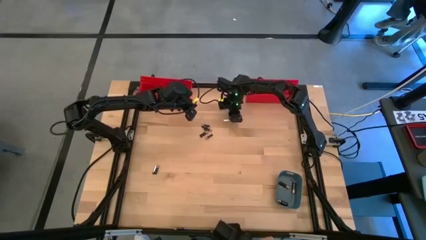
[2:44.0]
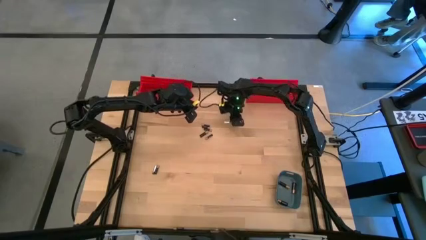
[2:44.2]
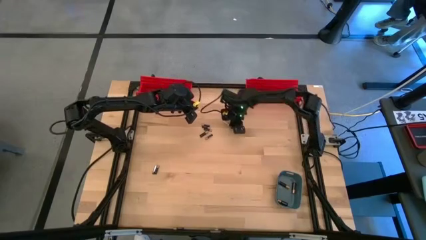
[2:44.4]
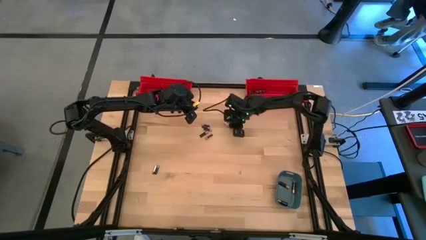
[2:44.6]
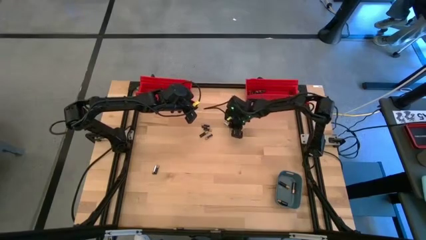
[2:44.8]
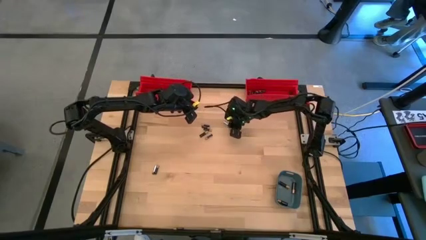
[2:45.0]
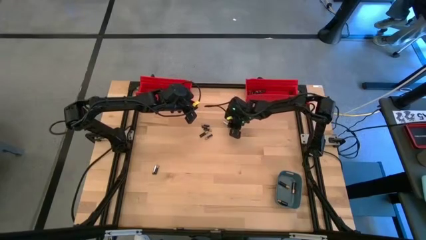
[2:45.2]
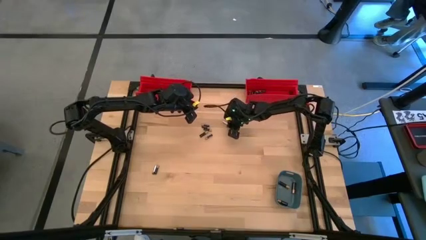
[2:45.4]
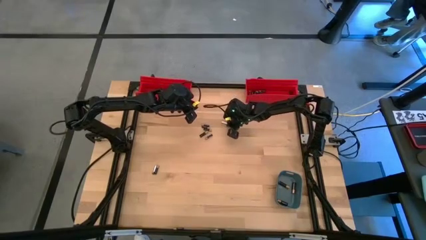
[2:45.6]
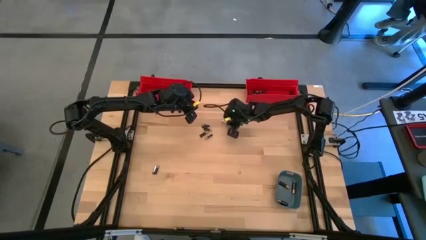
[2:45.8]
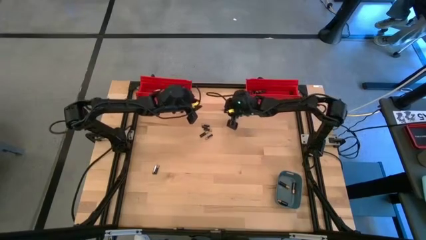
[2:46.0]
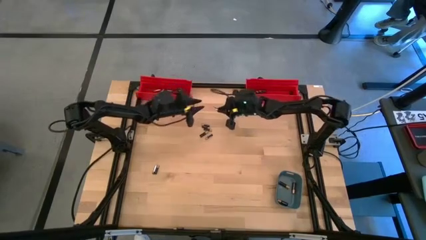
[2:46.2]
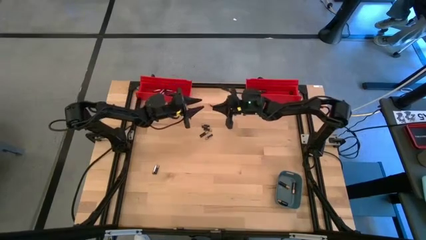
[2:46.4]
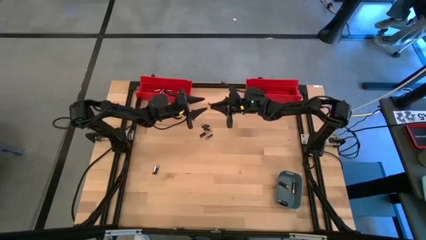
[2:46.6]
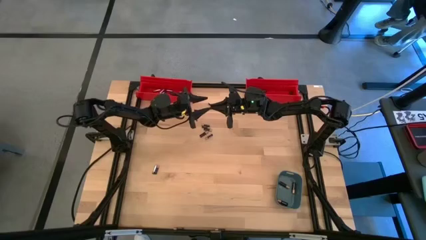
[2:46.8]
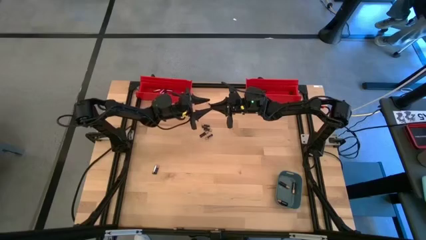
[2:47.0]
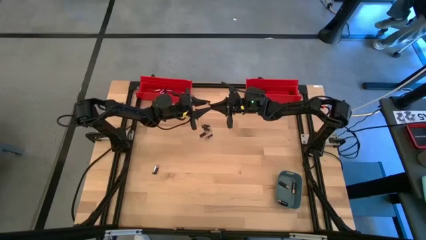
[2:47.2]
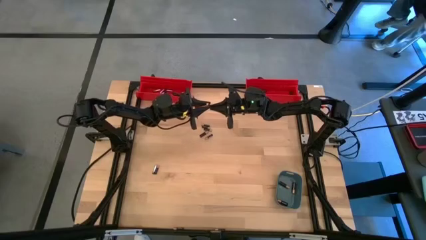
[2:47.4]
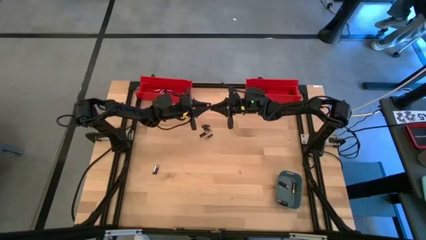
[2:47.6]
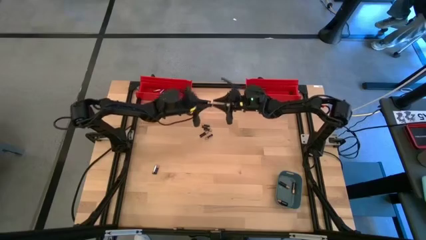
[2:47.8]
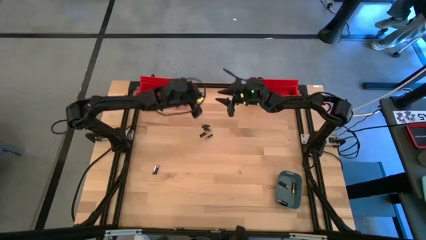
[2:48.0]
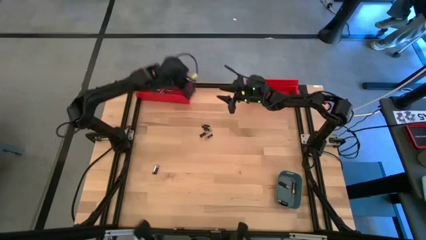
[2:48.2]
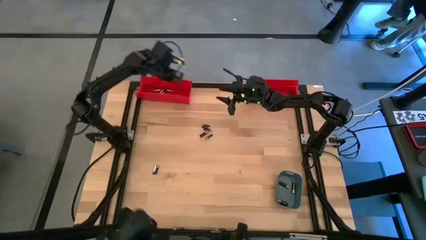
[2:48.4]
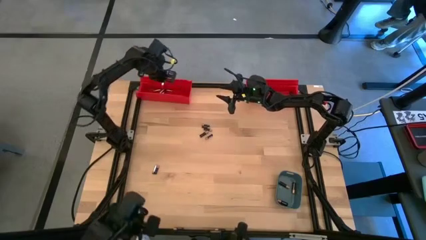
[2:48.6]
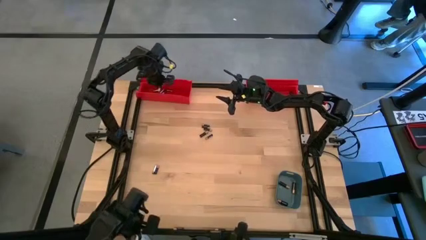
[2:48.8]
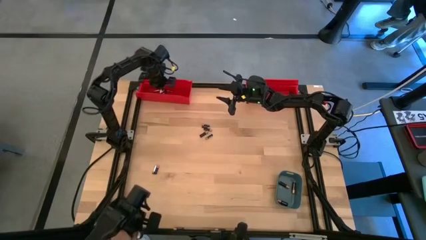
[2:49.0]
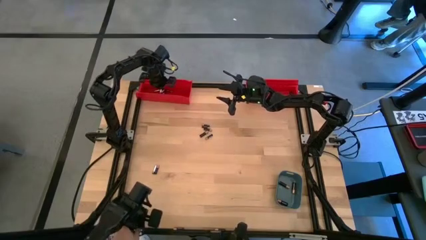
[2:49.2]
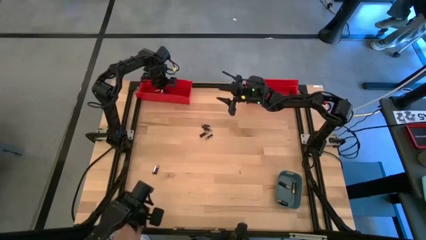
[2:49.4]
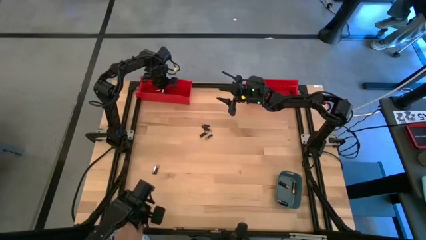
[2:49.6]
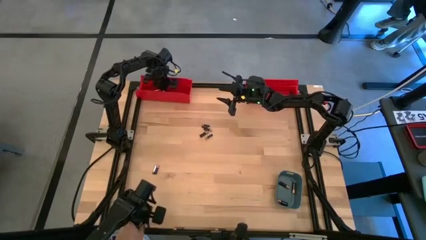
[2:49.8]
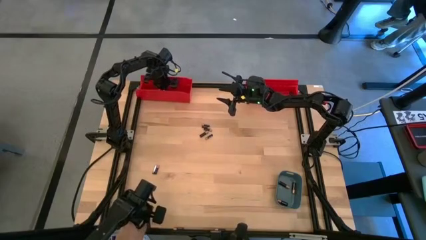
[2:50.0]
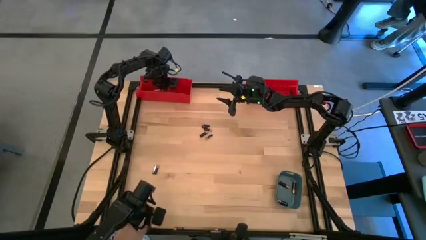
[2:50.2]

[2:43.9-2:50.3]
Task: Sort batteries
Put the small silver battery into the left red bin

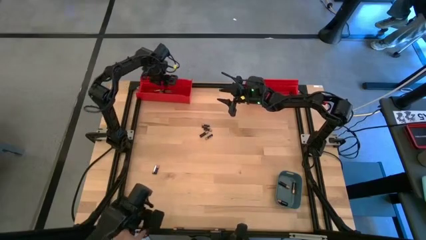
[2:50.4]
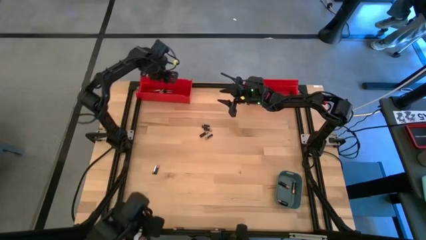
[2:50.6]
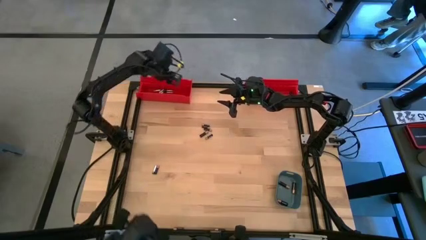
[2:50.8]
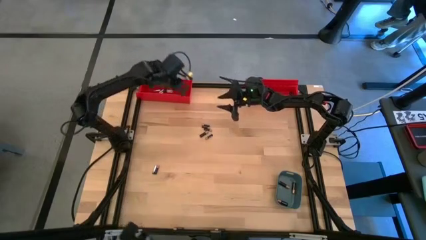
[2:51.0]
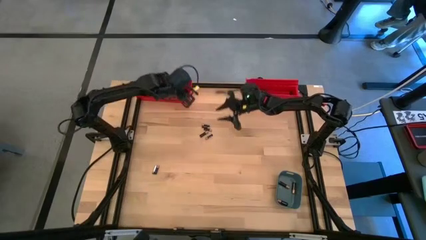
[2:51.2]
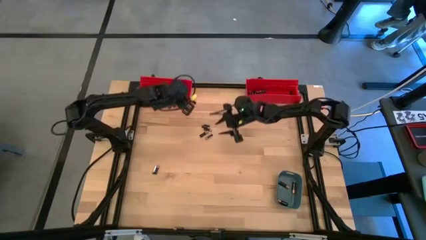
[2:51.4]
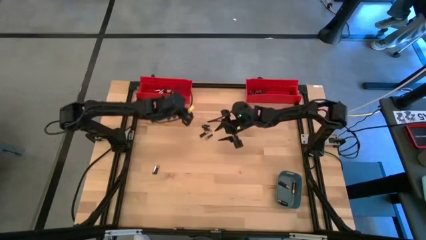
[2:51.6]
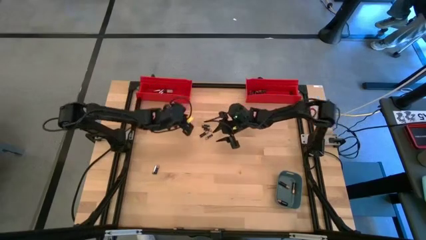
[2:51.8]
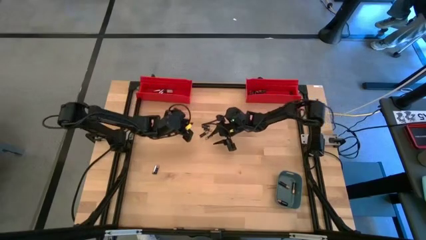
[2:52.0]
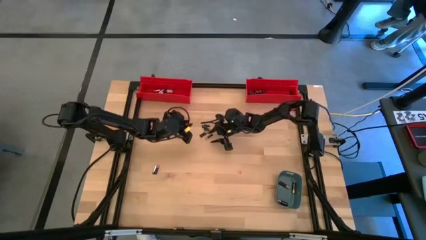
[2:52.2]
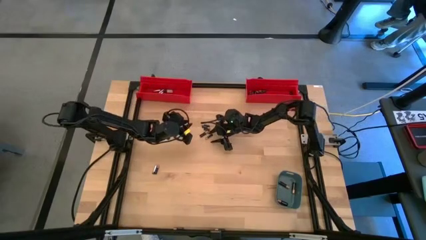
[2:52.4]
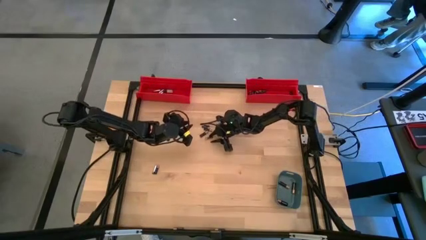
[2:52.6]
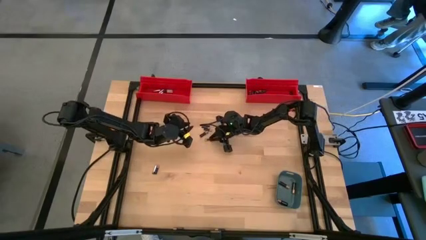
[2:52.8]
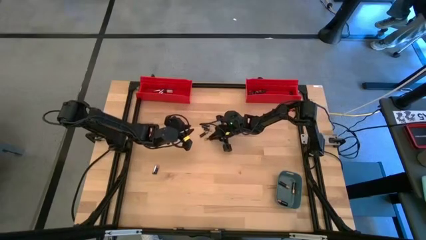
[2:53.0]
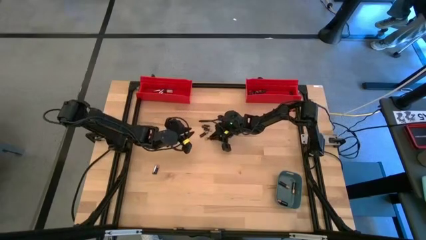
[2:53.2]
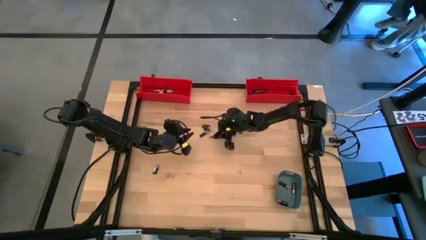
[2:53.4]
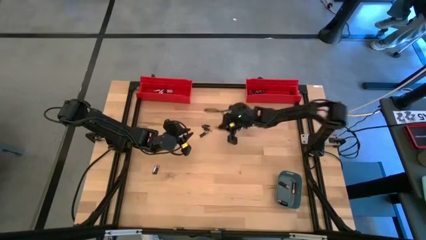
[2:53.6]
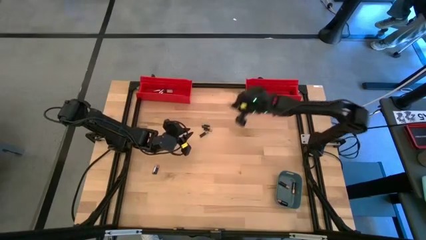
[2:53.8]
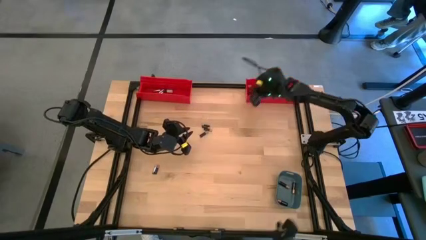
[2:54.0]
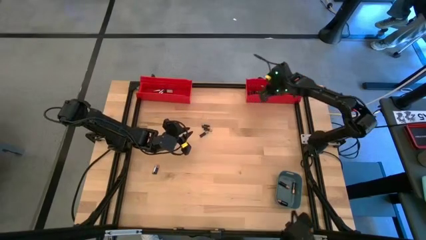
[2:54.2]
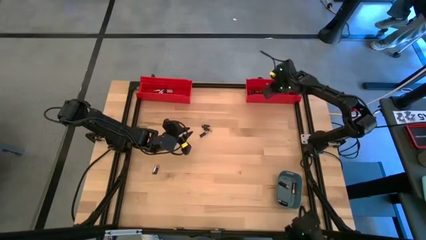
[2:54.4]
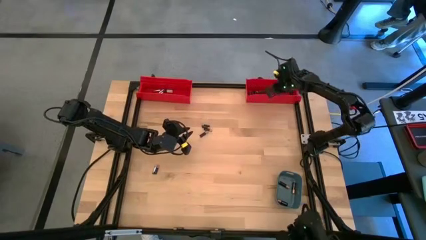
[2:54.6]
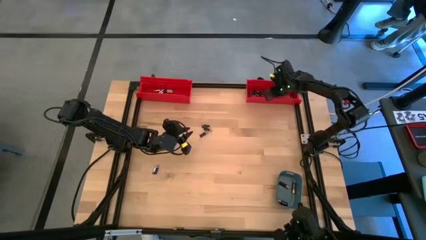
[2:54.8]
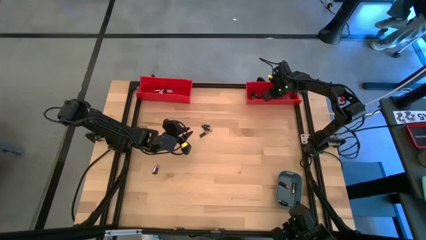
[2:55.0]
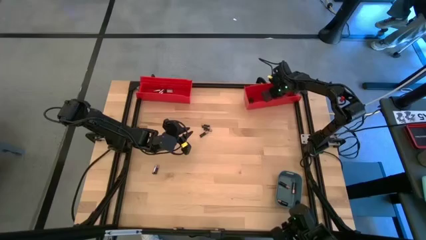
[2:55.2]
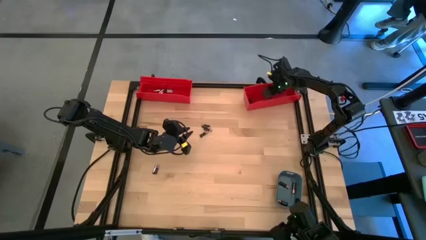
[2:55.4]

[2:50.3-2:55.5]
Put the small black battery into the right red bin

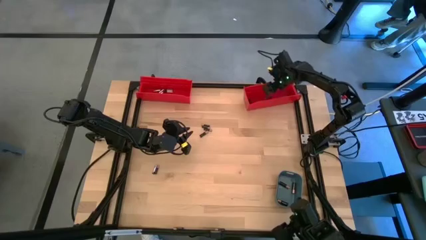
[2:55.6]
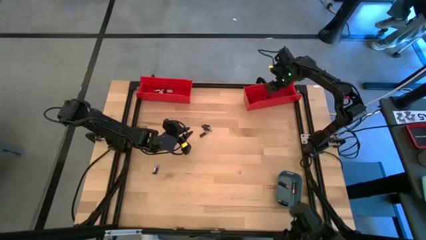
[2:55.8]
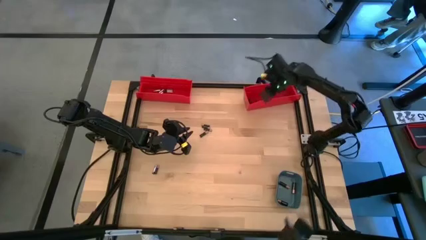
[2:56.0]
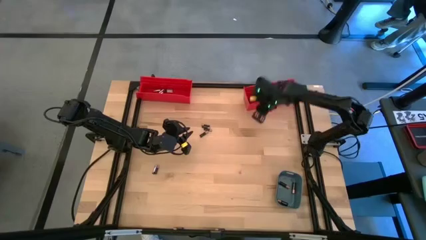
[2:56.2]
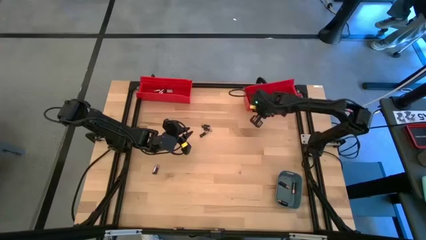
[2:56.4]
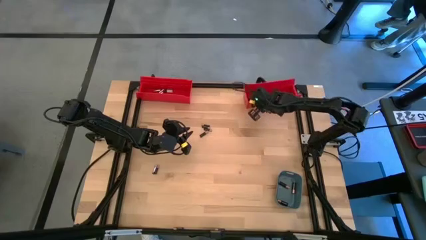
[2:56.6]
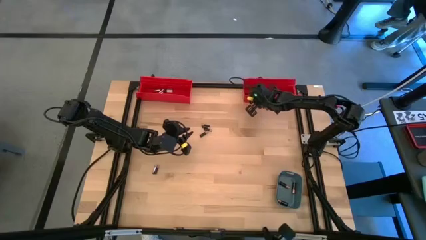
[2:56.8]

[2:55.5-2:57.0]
Adjust the right red bin

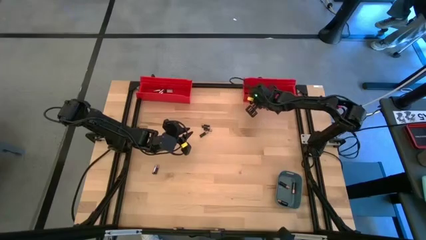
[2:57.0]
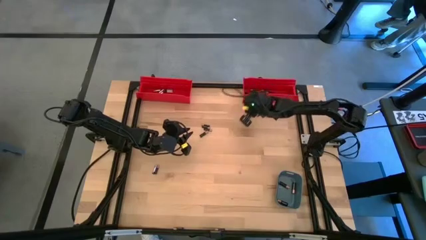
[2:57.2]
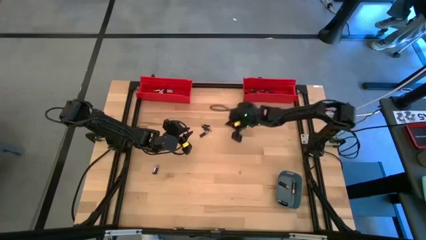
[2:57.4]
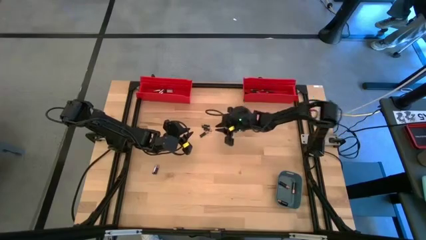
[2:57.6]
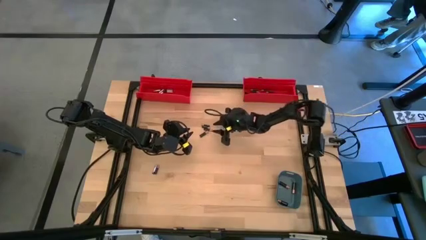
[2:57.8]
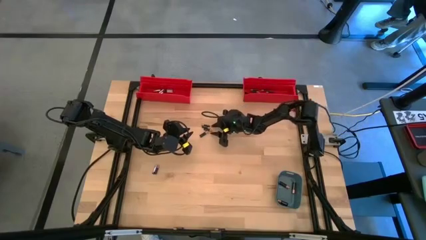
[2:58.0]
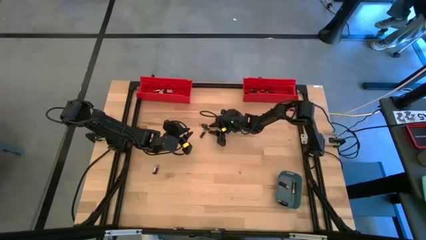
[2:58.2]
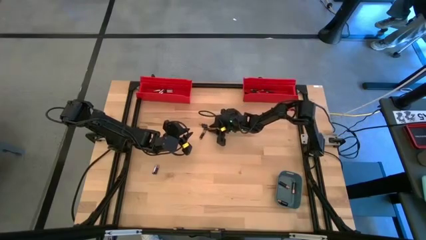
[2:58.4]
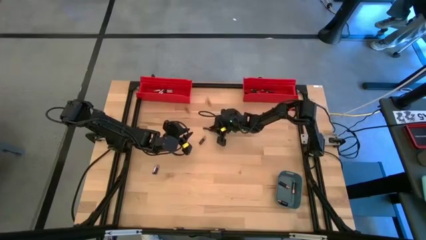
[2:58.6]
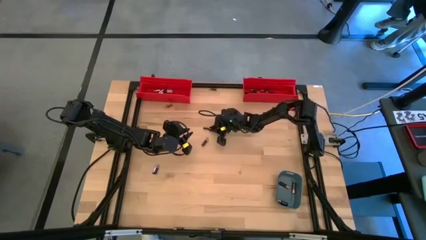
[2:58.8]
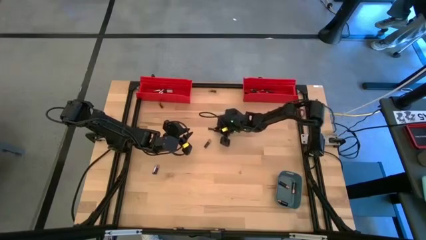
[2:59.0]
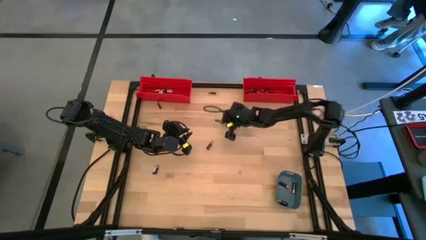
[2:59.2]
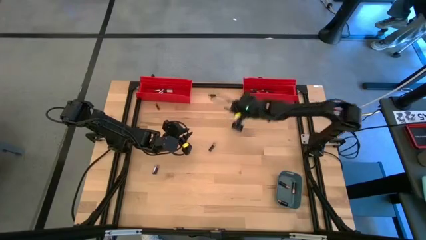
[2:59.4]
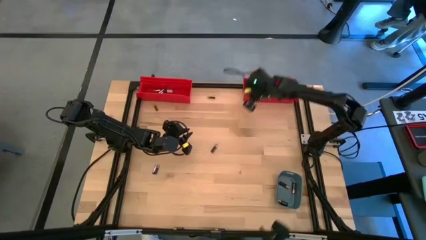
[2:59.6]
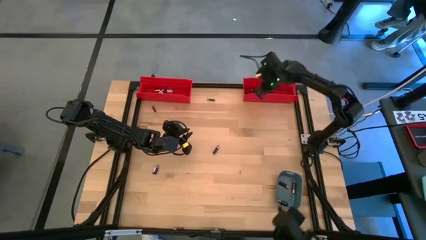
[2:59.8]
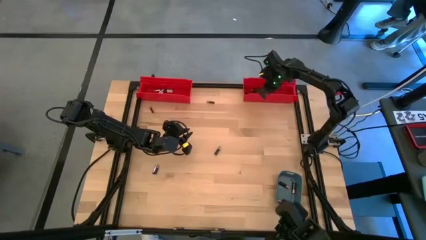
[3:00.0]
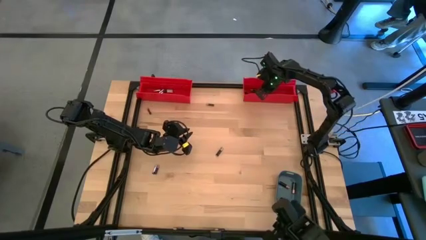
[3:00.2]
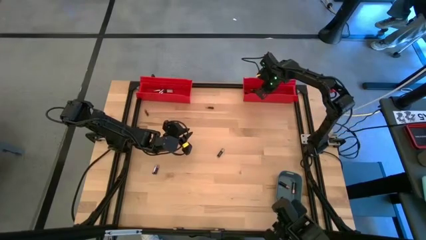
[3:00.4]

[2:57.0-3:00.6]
Put the small black battery into the right red bin

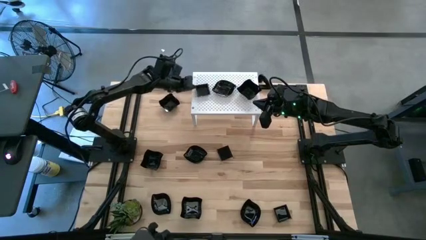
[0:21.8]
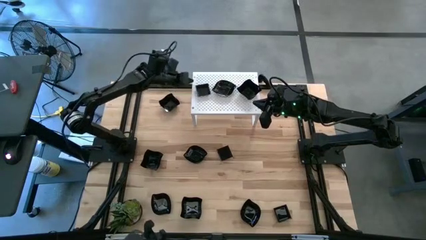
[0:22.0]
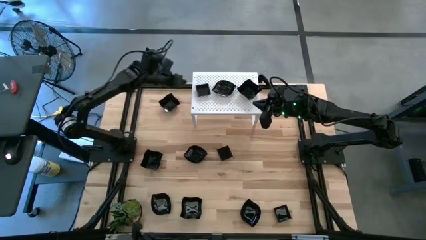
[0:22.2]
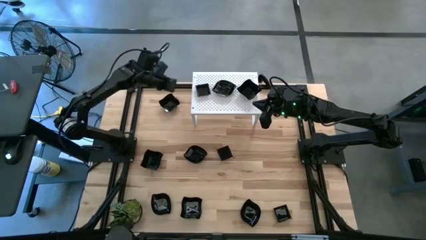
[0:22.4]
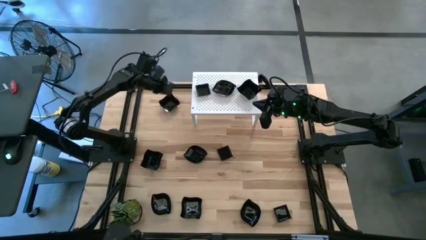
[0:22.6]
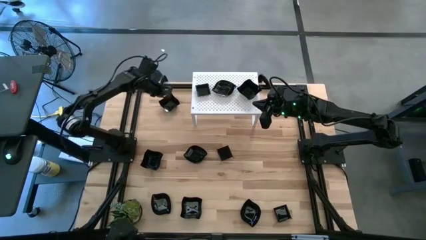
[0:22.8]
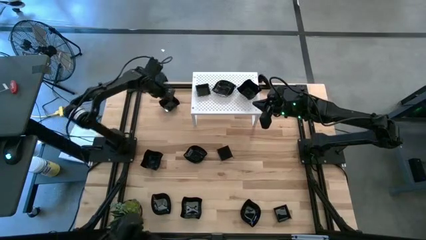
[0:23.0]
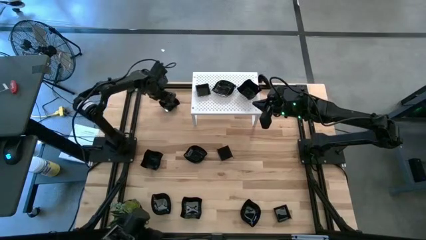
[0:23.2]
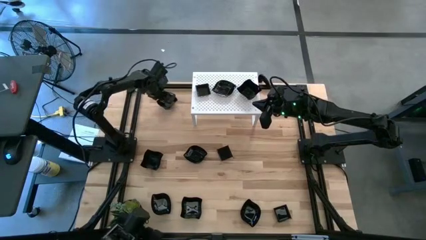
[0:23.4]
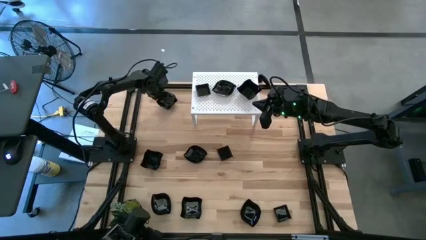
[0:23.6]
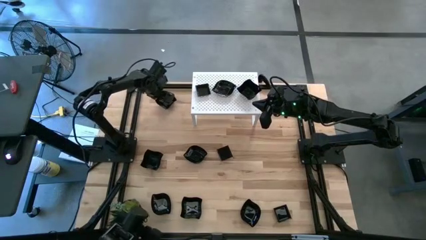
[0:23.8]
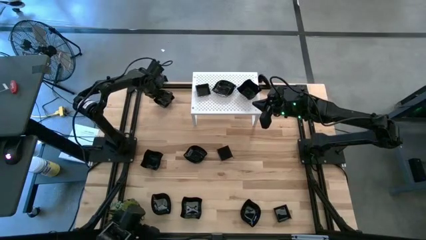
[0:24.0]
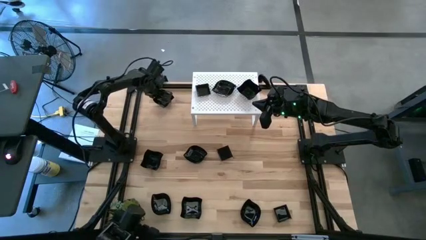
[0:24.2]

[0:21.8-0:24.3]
Task: Pick & Place Mini shaped plates
Stack the black distorted square plate on top of the black distorted square plate on the shelf
